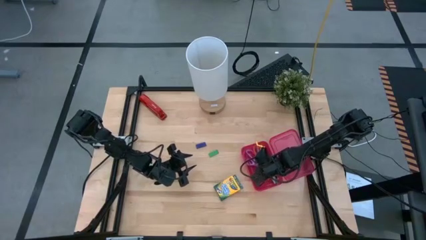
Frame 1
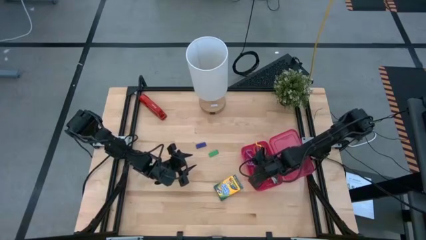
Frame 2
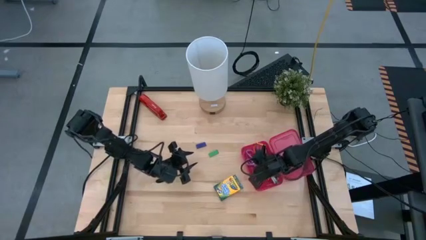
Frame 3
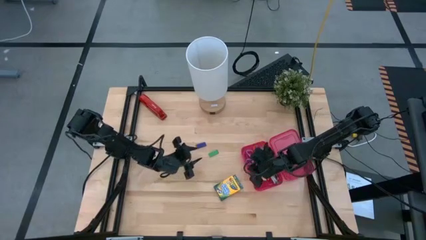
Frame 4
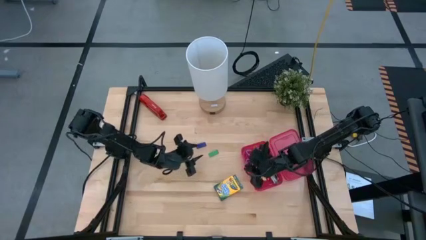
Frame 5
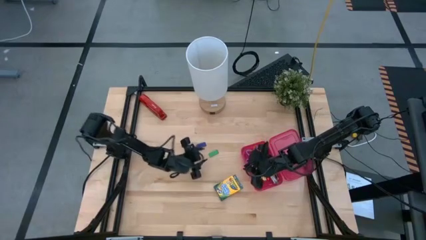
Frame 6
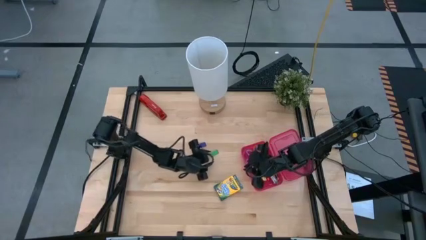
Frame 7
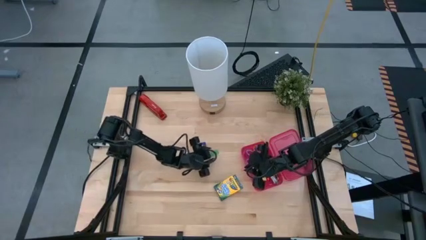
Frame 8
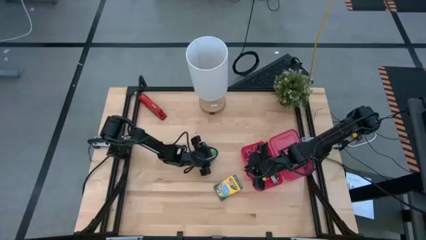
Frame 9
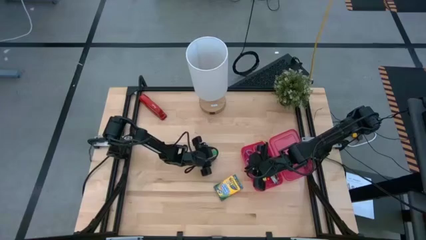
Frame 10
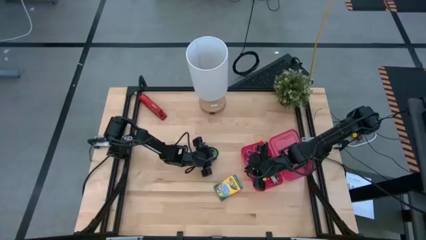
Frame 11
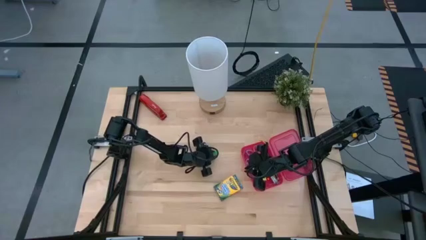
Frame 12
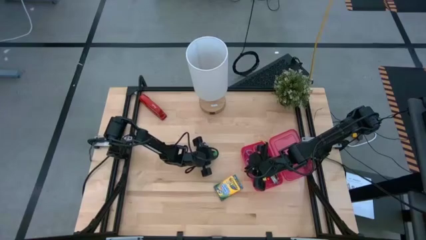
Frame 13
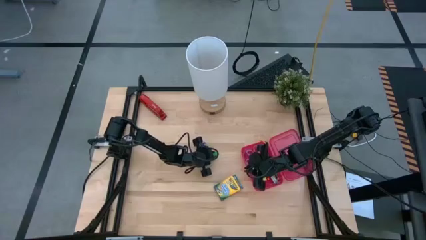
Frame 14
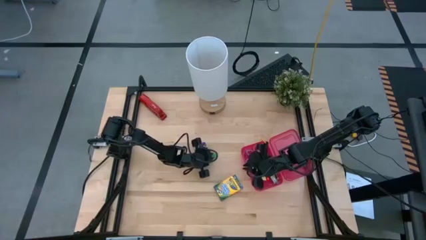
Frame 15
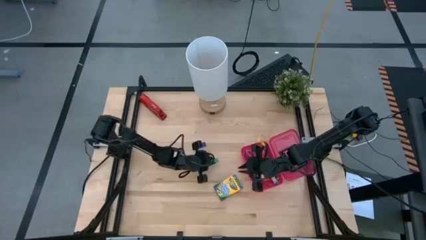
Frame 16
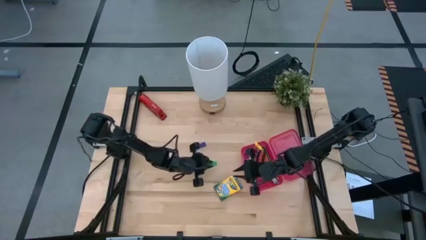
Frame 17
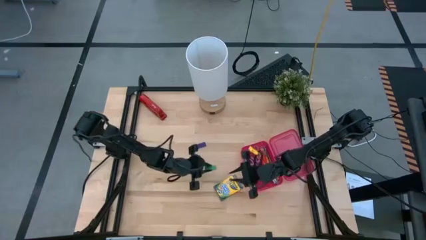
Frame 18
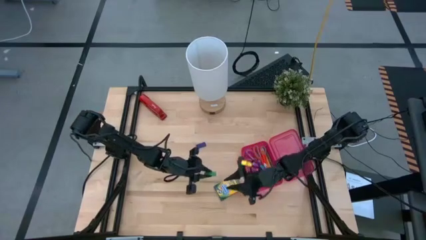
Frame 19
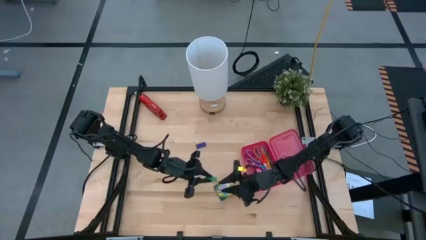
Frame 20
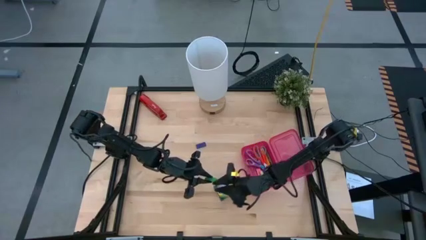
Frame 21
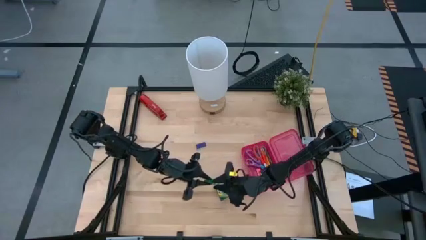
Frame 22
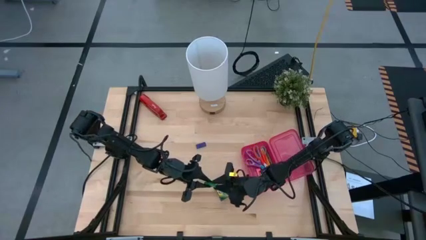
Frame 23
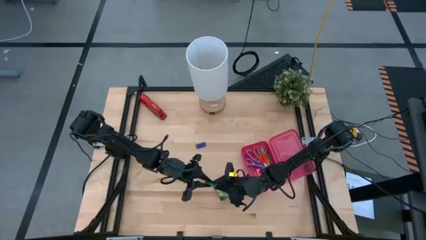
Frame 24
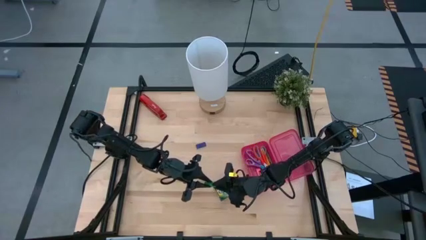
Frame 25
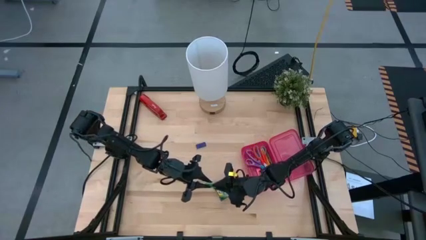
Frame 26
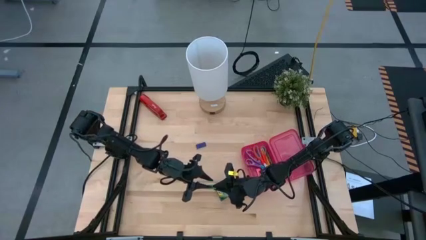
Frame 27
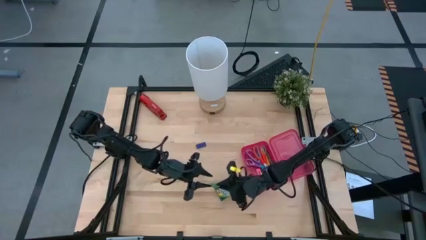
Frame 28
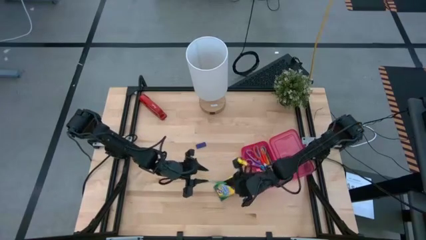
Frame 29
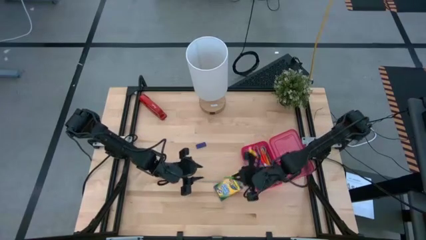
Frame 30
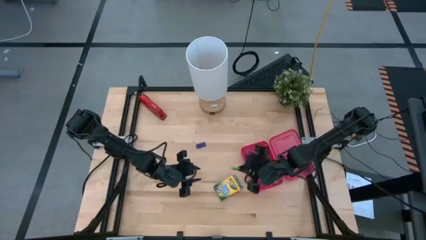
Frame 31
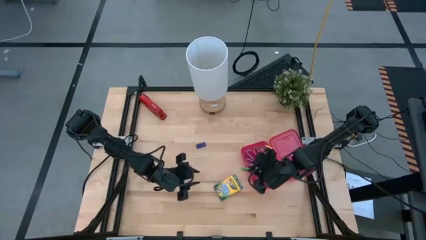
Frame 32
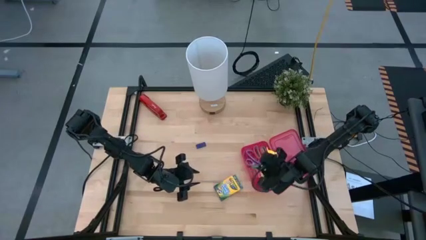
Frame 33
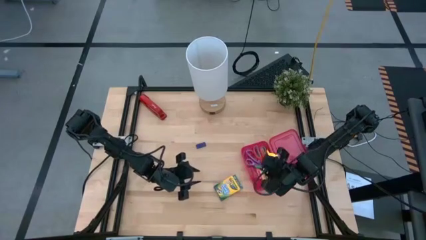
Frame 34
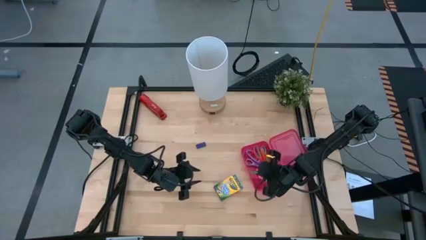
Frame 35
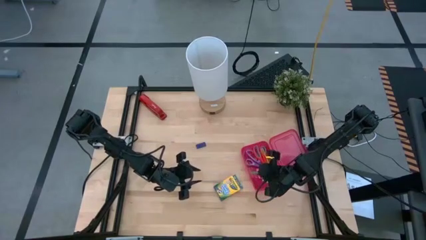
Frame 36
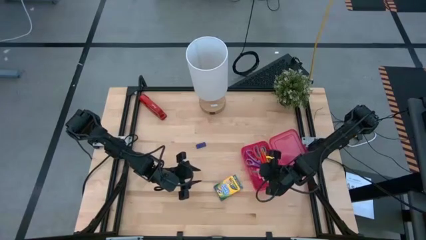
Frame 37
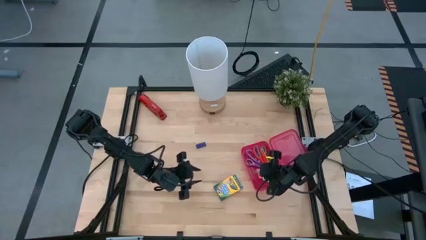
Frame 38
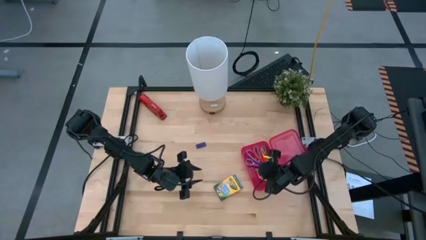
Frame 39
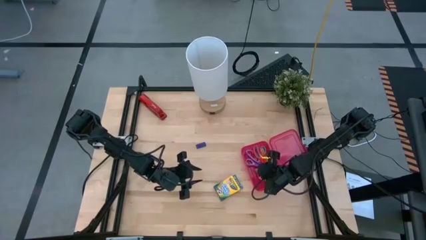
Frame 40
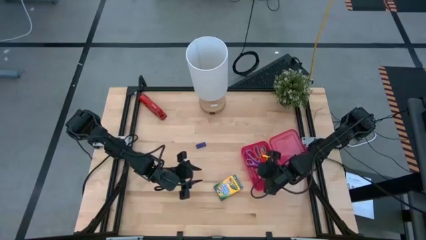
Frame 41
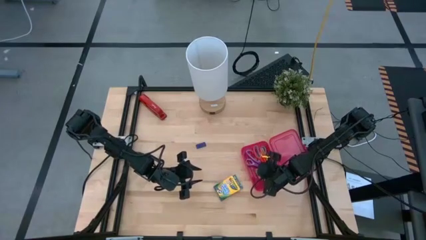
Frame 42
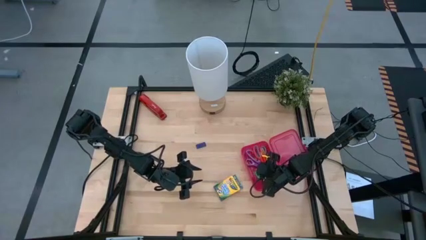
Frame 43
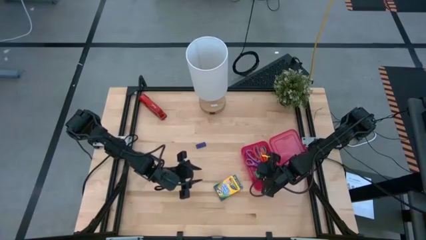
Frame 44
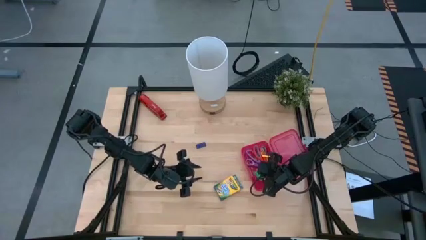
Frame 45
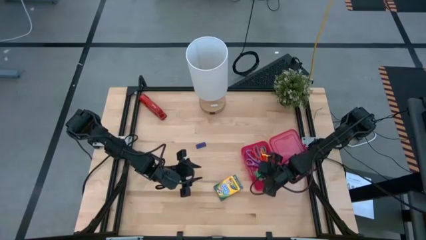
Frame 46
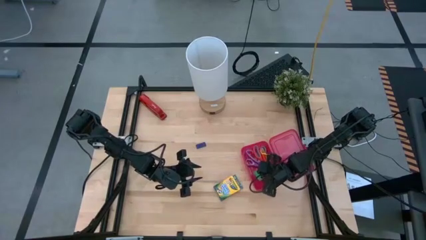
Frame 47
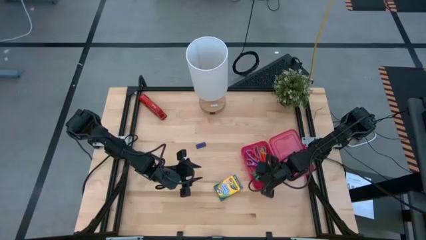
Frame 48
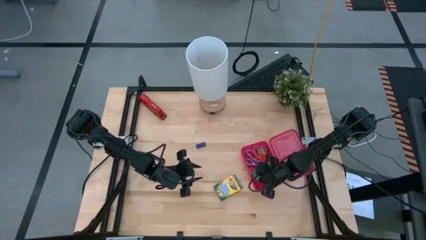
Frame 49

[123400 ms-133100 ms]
Task: Pack school essentials
Put the green eraser into the pink supply box

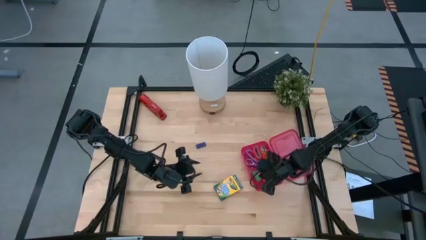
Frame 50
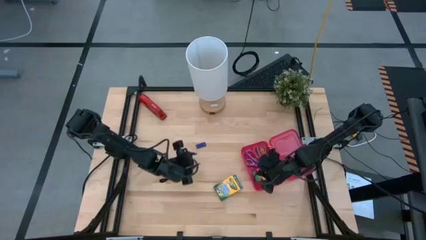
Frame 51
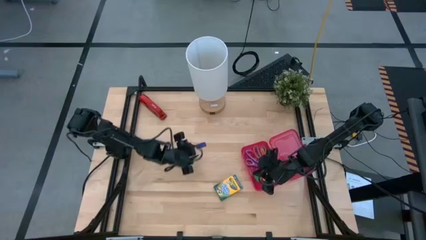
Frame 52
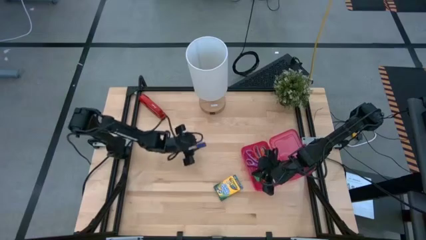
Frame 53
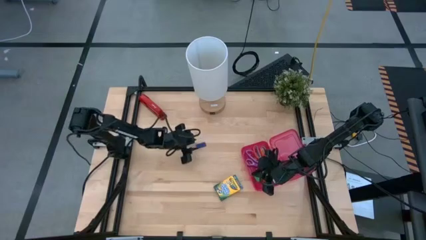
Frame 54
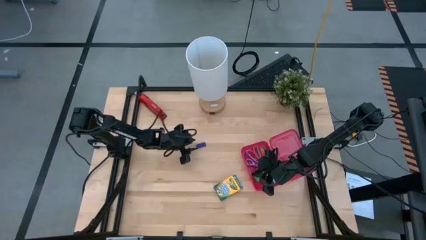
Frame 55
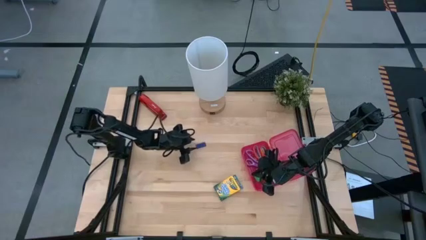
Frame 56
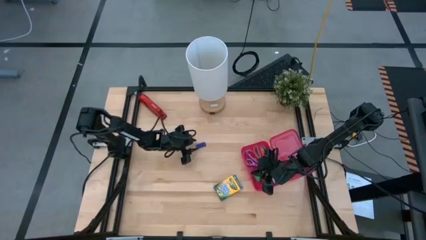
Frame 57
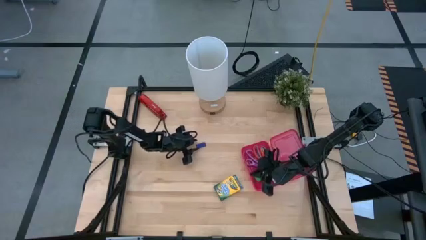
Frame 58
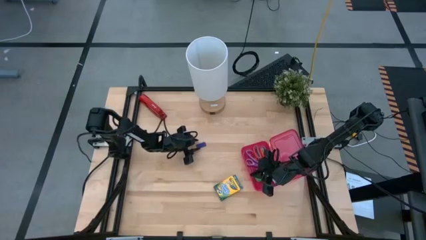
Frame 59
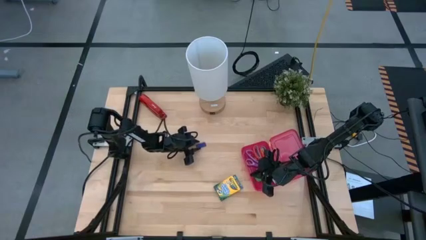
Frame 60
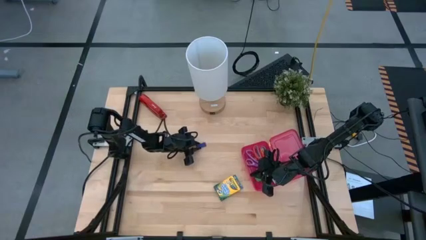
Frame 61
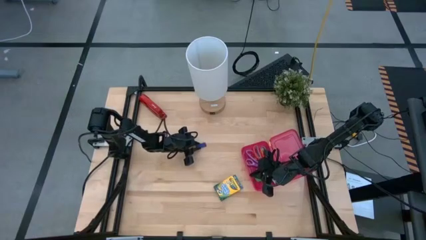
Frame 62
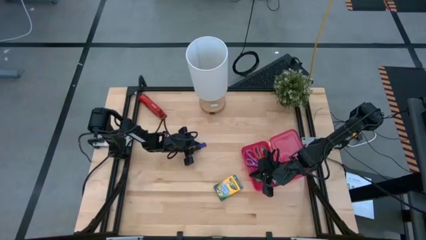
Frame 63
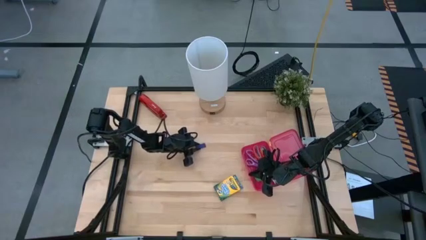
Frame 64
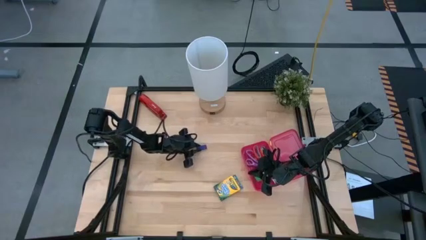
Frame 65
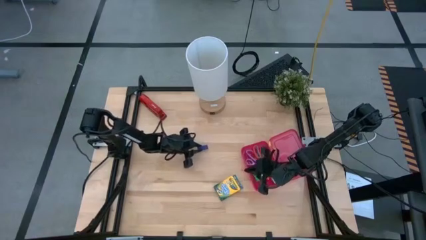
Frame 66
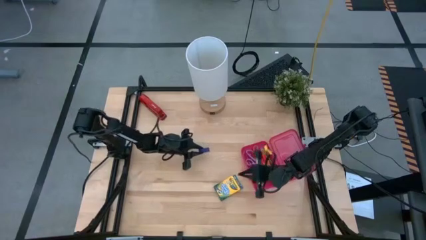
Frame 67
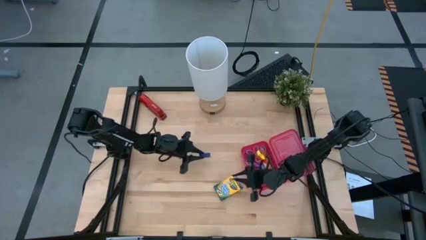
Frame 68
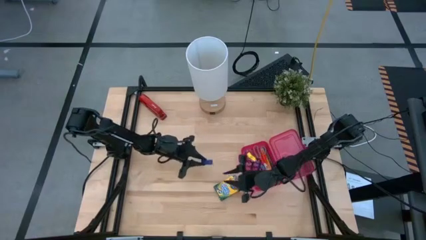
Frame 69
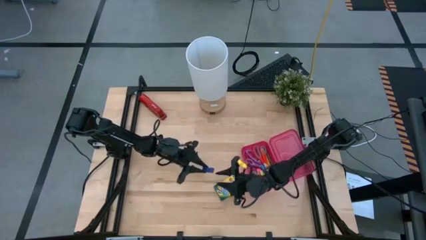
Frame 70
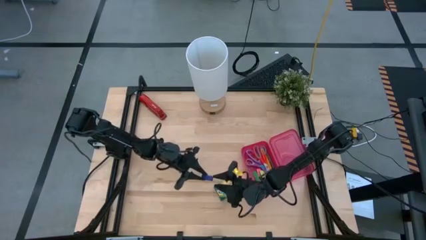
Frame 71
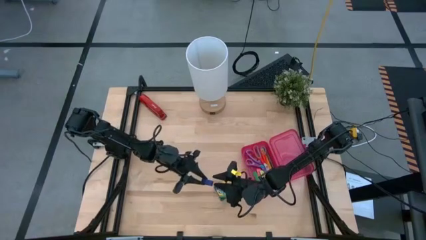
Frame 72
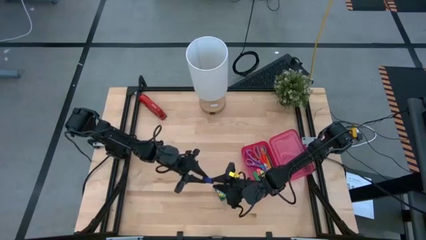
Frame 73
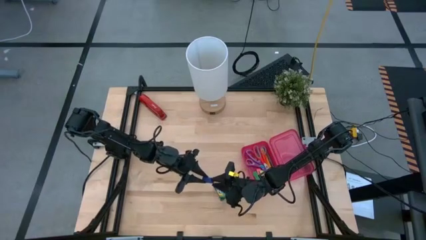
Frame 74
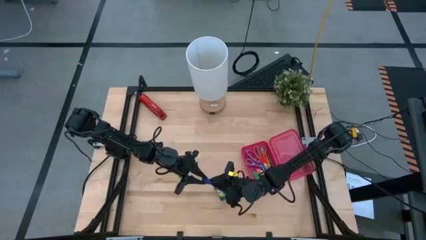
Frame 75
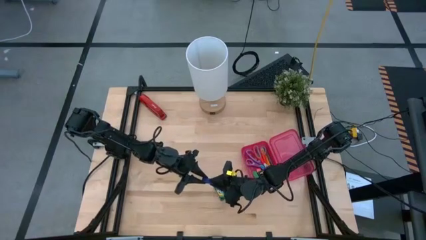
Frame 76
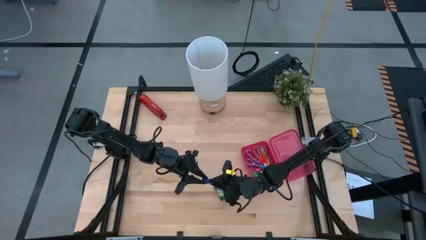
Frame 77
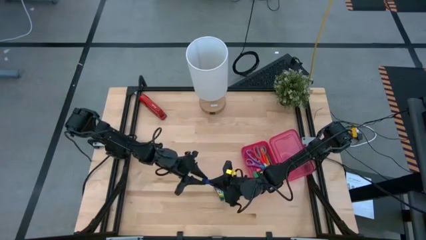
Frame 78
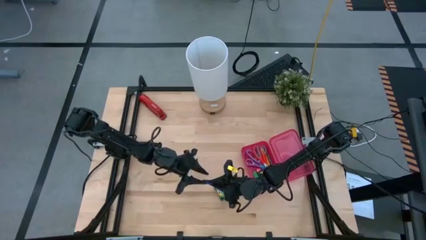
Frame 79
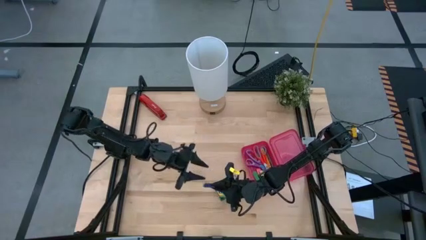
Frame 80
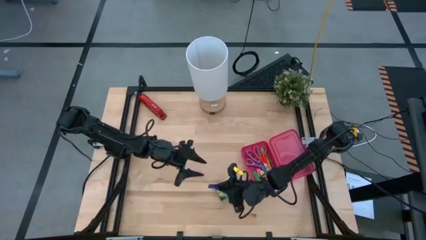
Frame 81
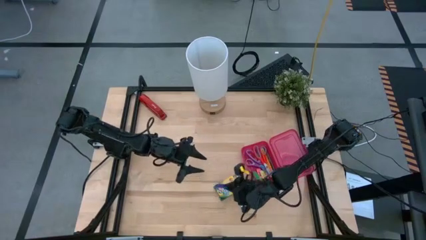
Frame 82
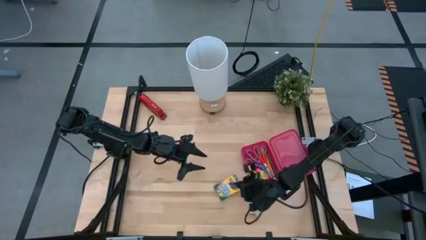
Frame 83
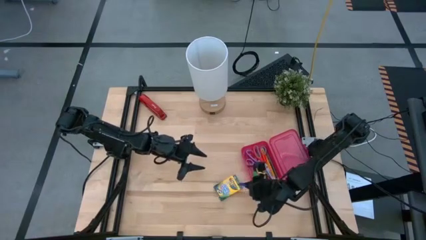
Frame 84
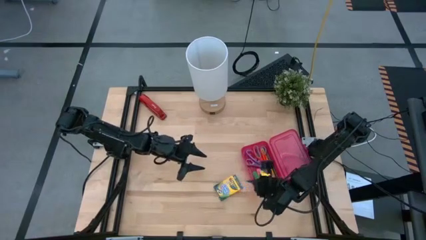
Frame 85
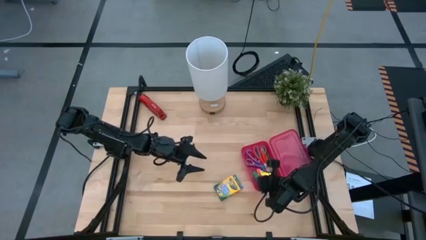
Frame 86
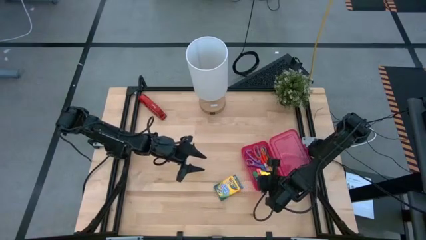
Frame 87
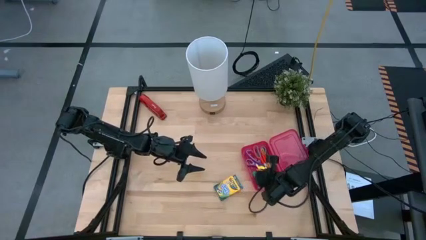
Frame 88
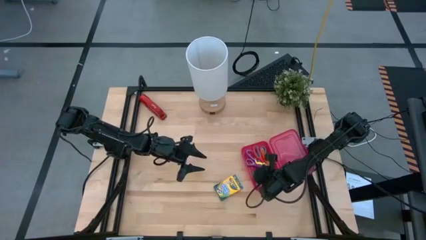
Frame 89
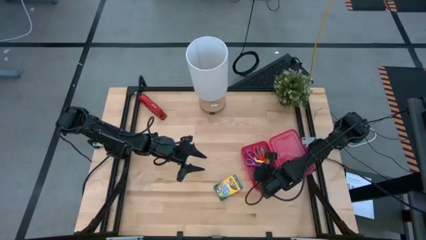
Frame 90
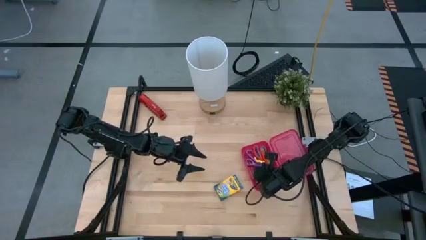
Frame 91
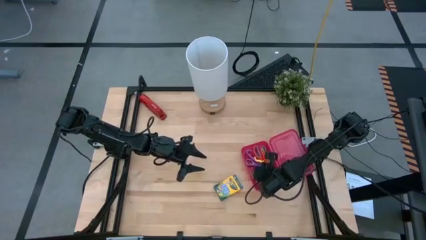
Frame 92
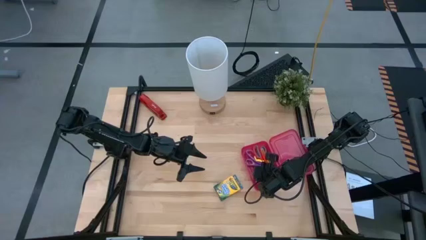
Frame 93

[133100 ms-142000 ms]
Put the blue eraser into the pink supply box
